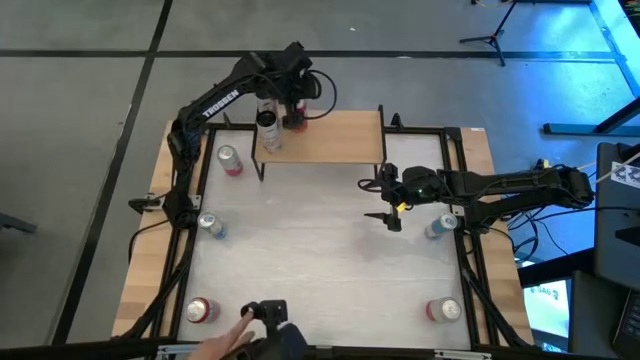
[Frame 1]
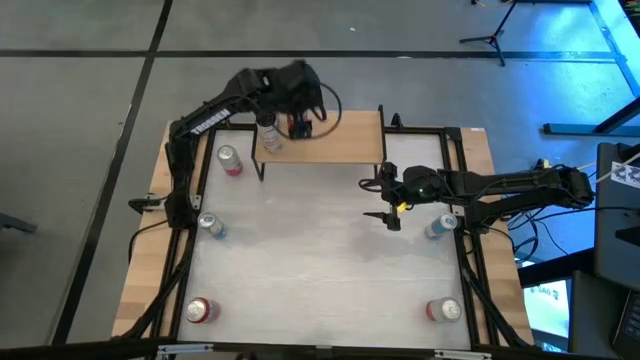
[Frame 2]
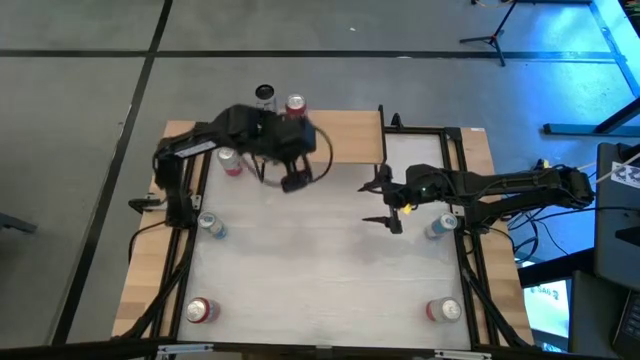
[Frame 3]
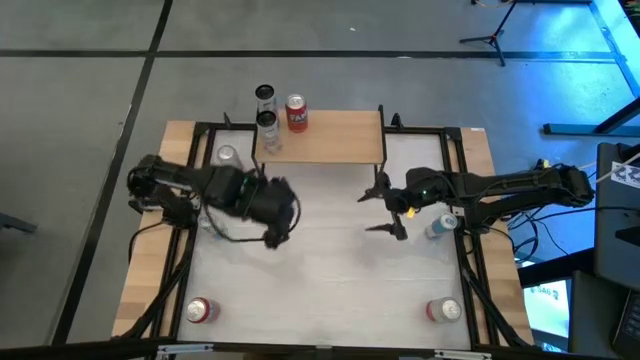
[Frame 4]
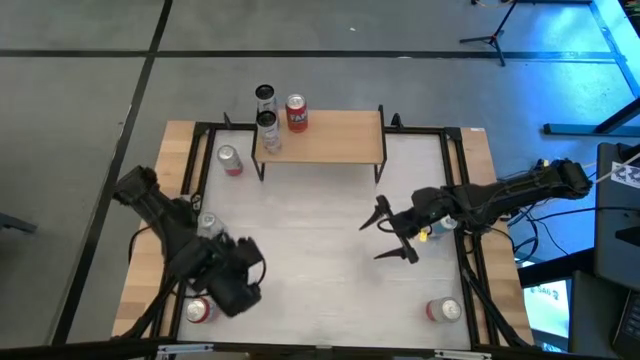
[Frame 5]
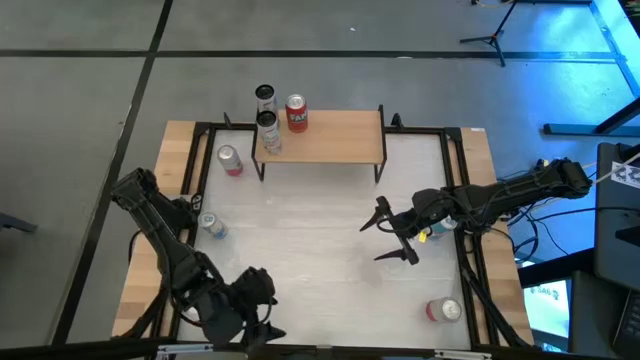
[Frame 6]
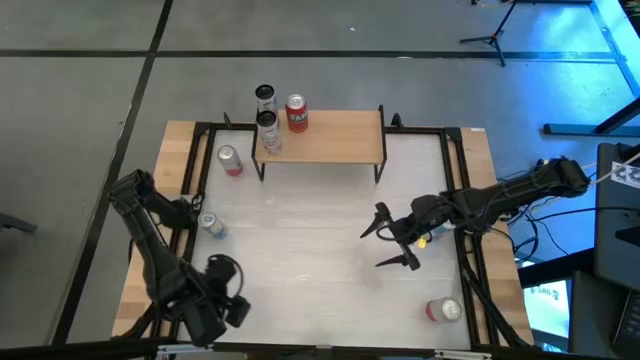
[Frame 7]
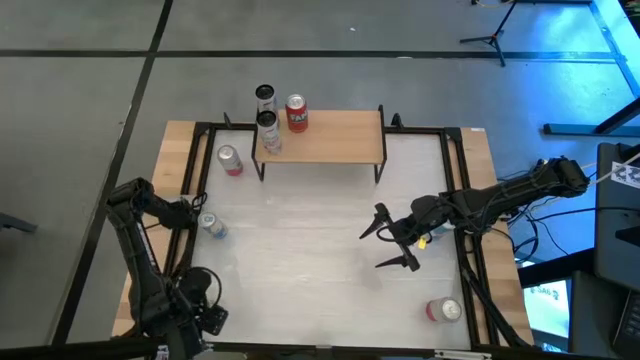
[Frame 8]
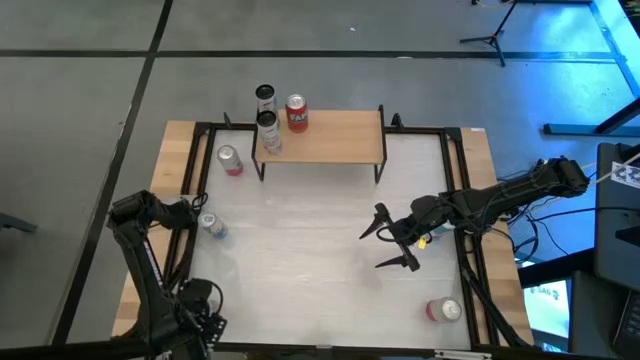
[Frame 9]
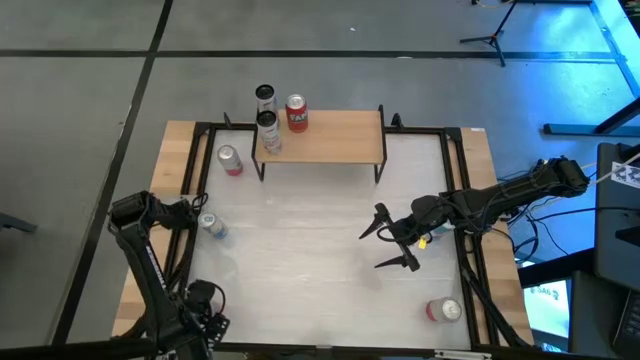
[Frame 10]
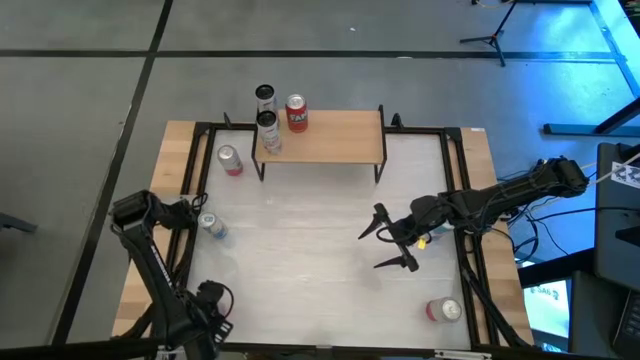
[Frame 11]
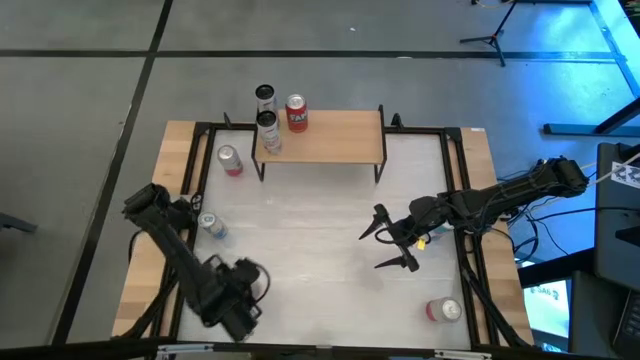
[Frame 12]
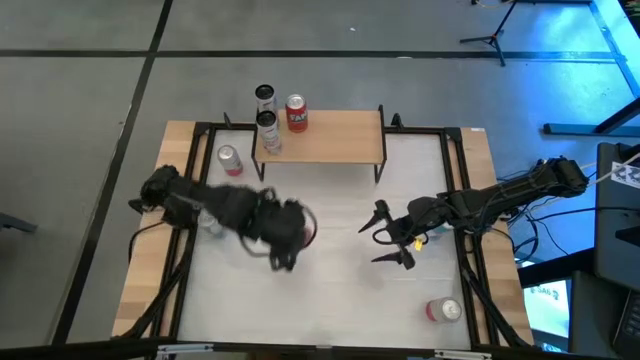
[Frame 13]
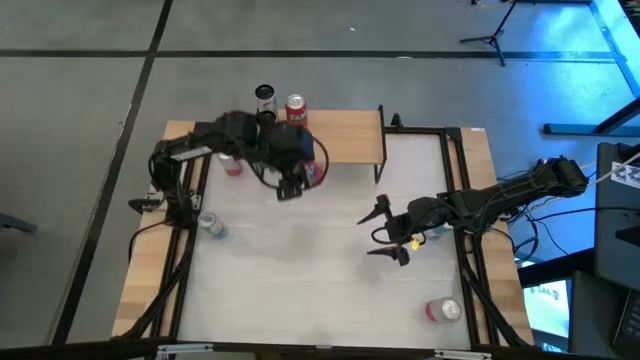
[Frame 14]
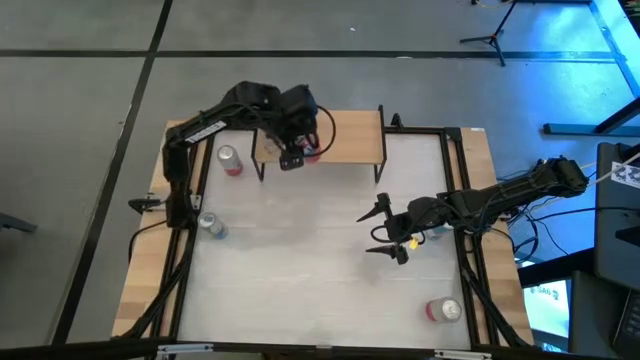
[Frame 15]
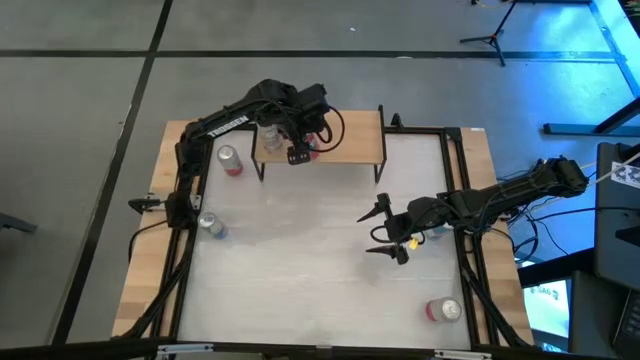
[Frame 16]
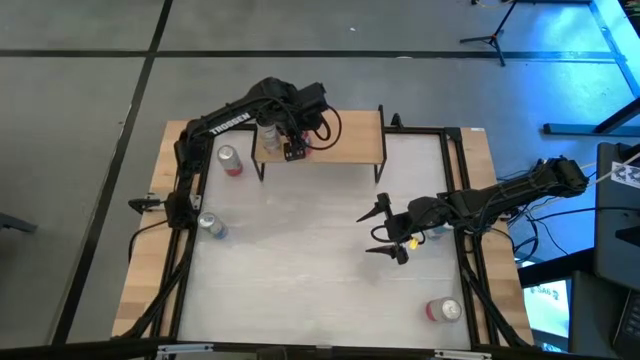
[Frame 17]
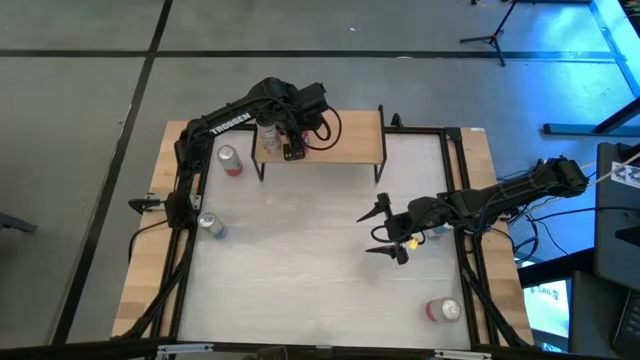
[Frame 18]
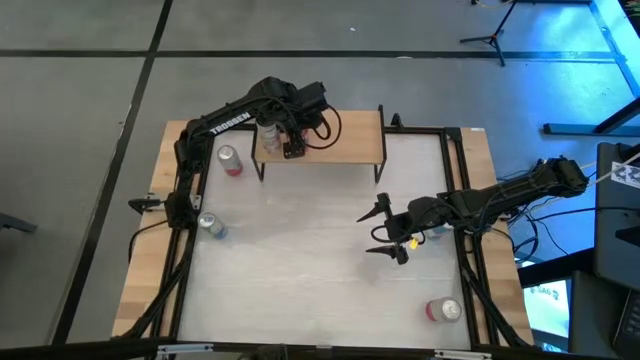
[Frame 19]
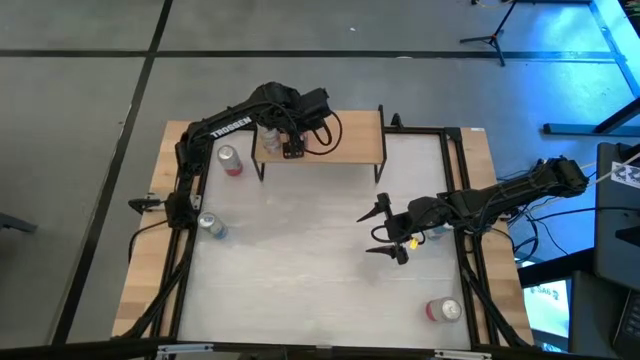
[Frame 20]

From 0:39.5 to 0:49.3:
Task: Place canned beverage on shelf
Put the orange soda can on the shelf

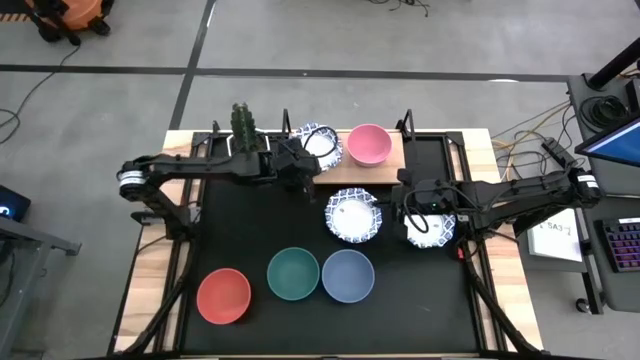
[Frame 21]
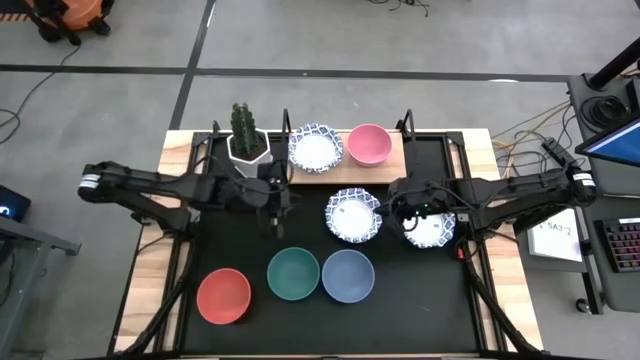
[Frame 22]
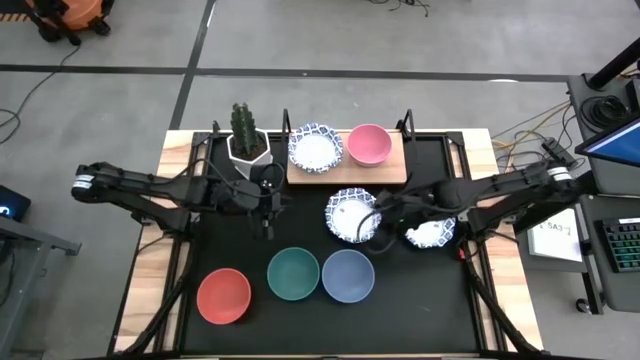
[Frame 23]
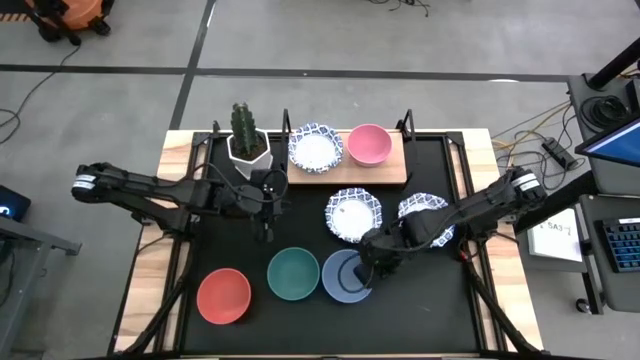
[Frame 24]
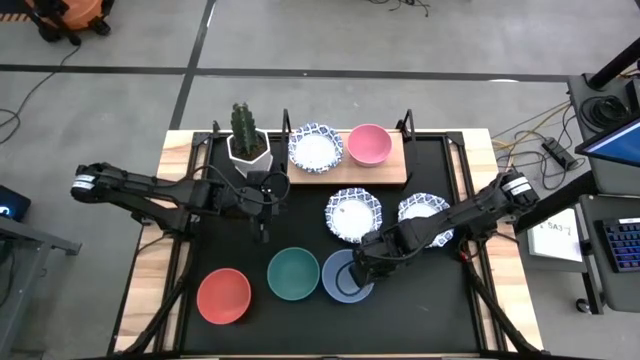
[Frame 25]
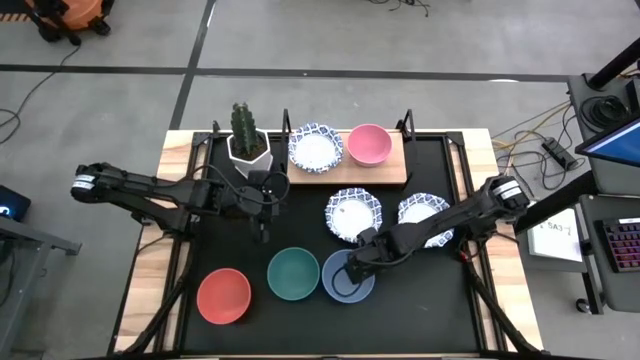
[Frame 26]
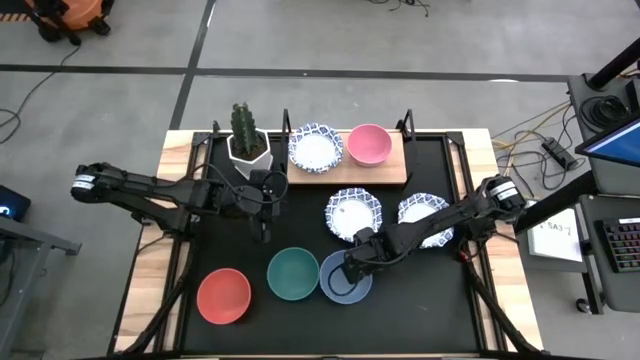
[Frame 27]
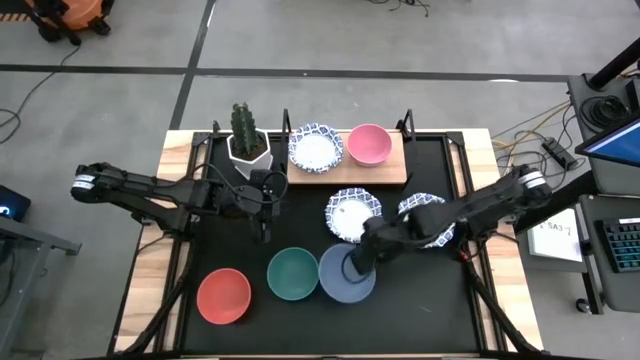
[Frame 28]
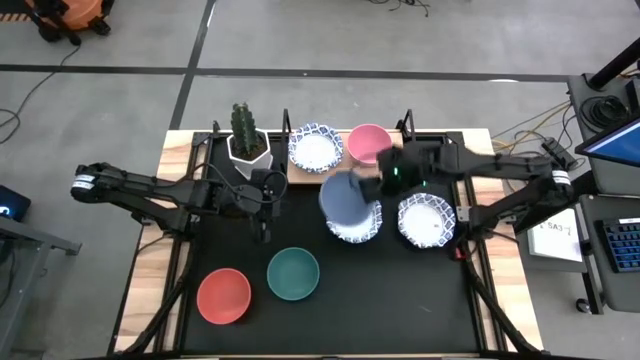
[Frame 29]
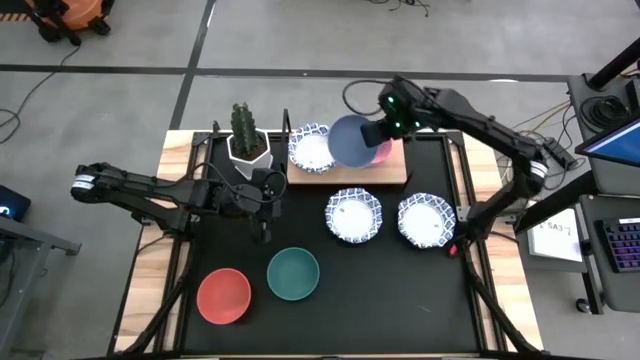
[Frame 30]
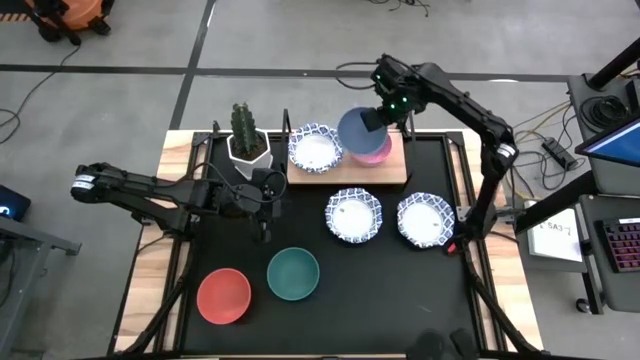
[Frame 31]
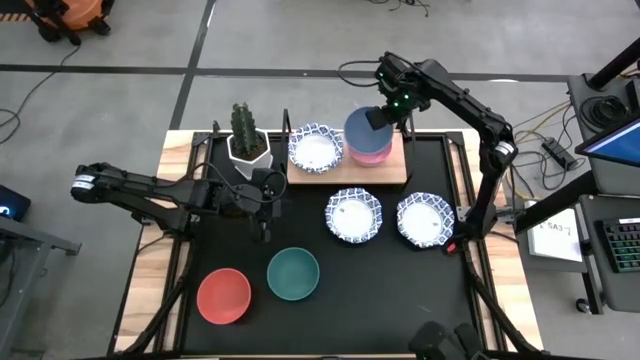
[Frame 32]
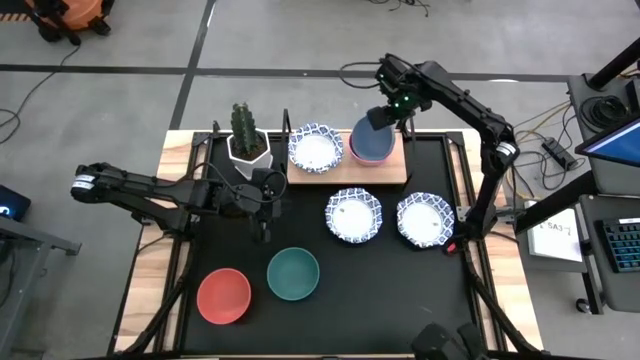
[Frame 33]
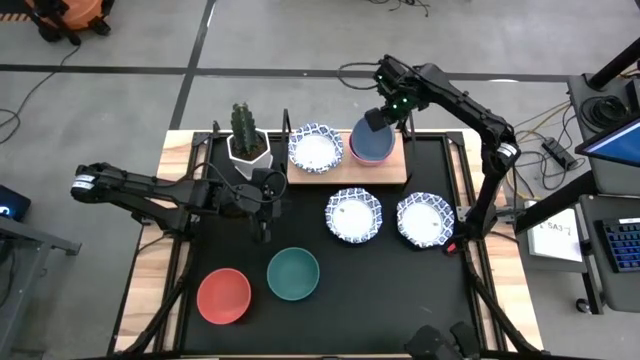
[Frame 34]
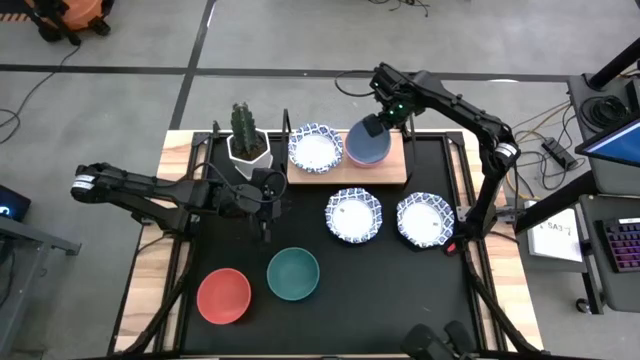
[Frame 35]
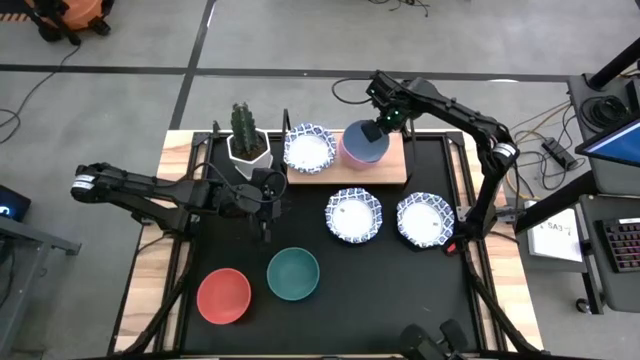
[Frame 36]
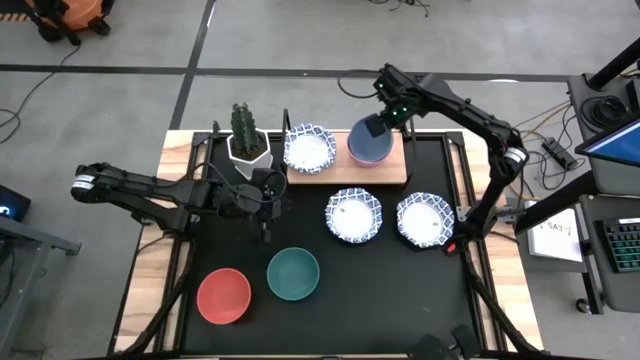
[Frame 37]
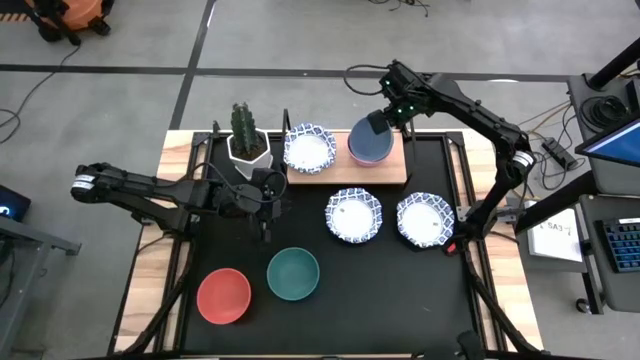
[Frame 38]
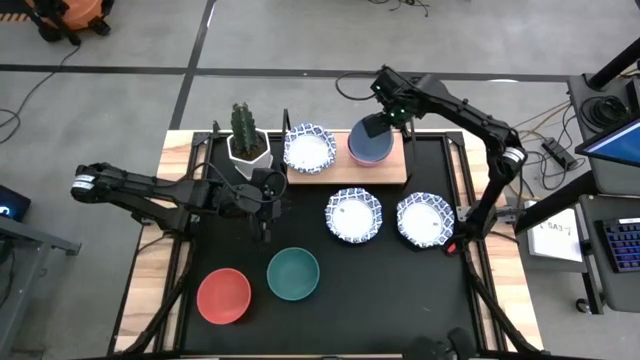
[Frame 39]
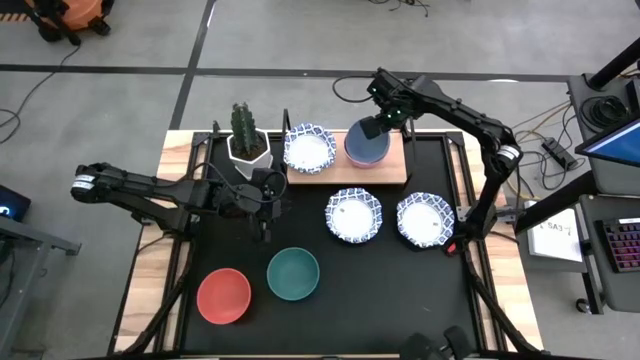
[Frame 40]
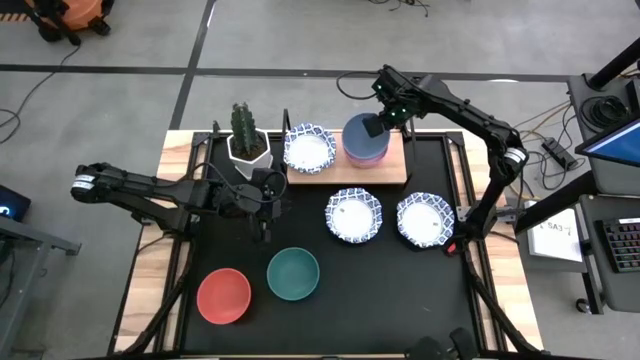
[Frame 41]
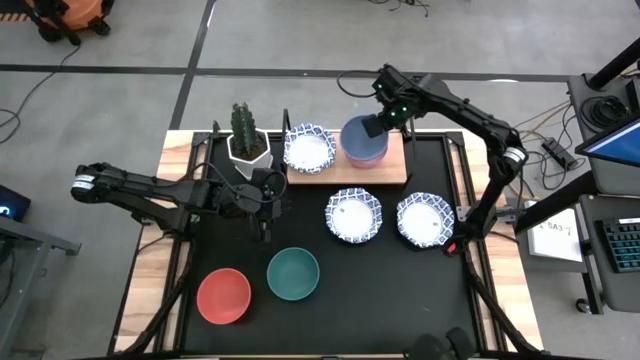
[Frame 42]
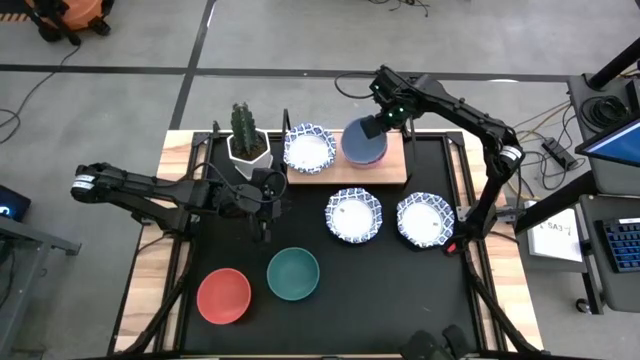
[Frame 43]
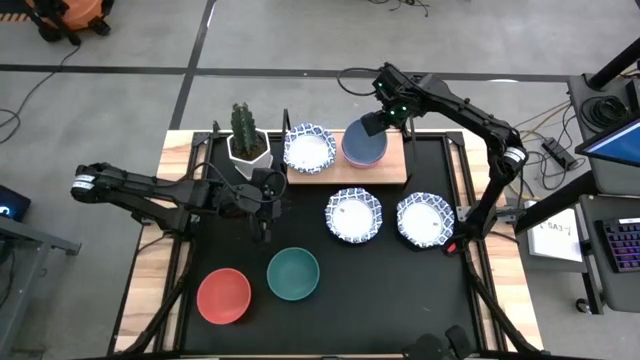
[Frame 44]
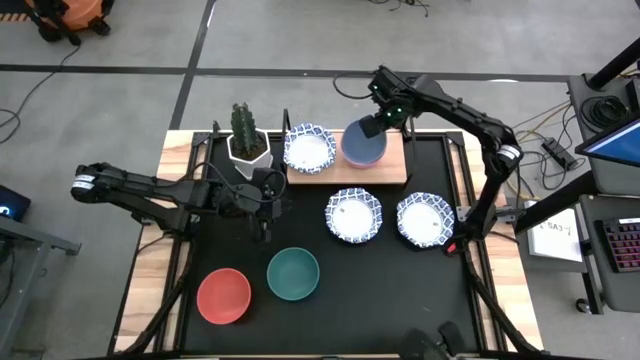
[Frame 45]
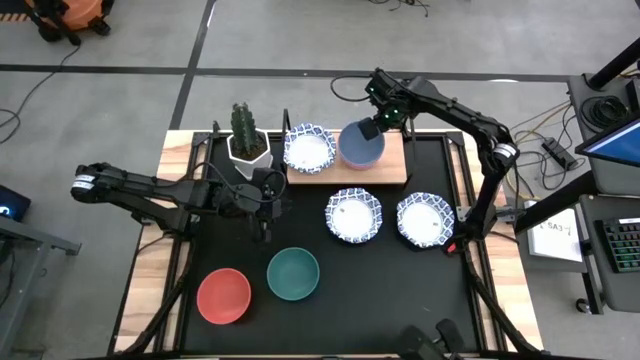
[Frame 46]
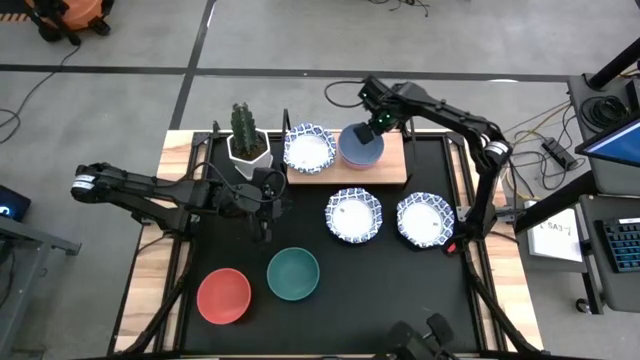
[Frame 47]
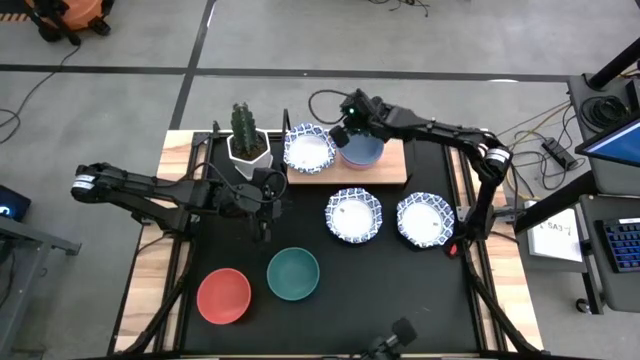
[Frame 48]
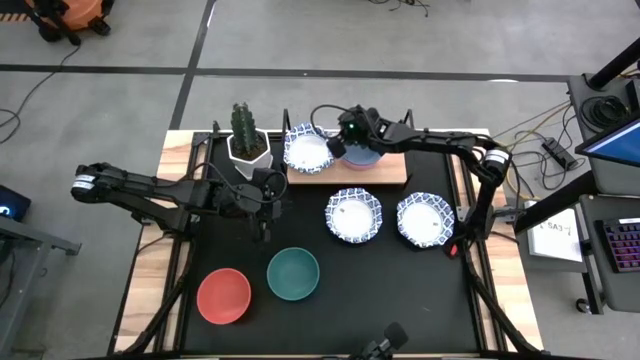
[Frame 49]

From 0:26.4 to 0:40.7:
Task: Place and stack bowls onto a shelf
Stack the blue bowl on top of the pink bowl on the shelf
